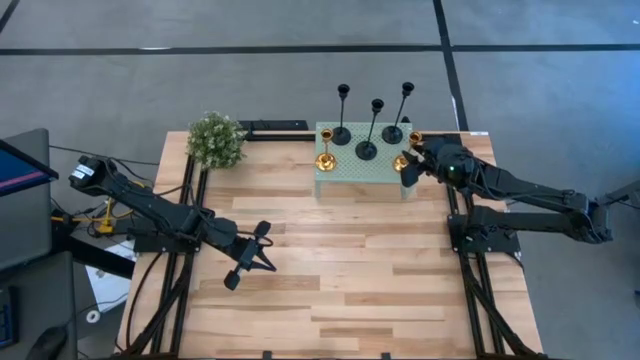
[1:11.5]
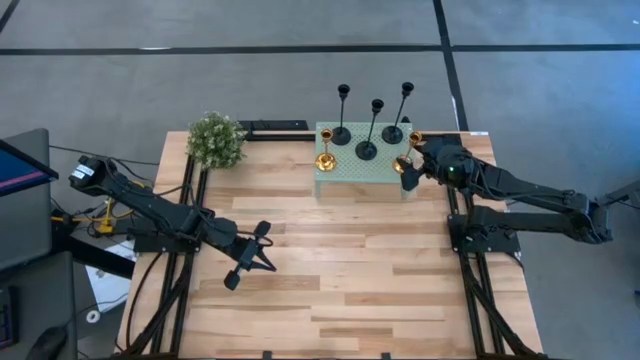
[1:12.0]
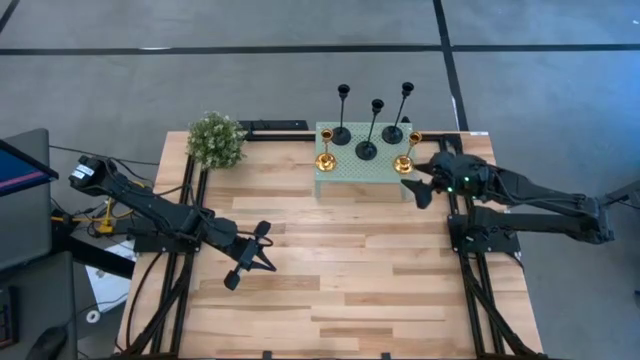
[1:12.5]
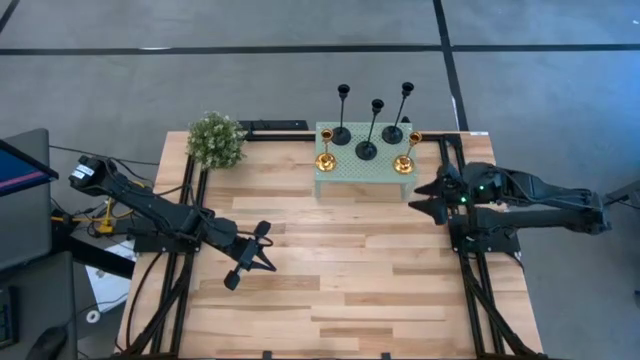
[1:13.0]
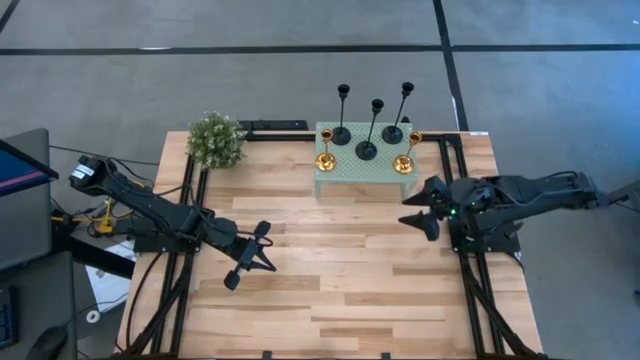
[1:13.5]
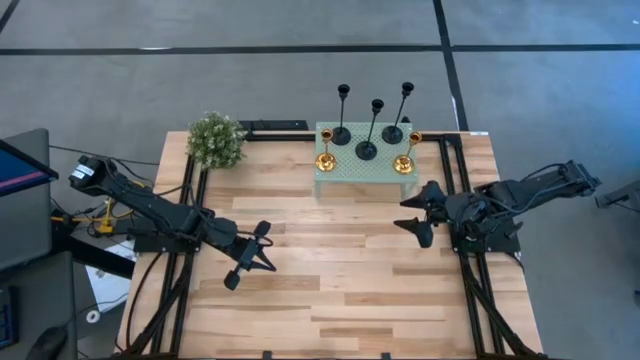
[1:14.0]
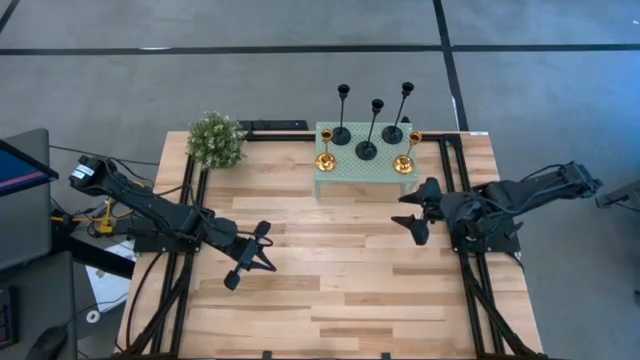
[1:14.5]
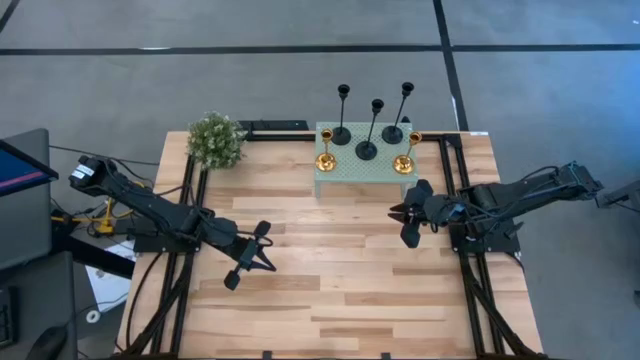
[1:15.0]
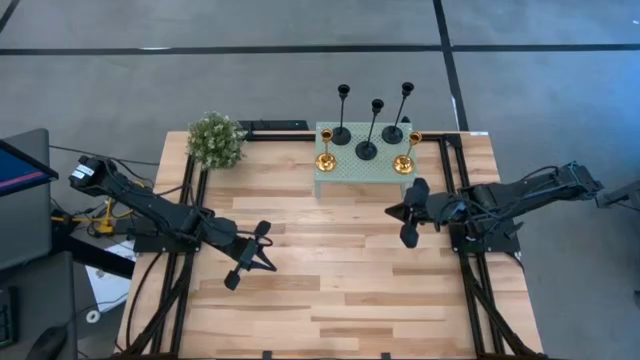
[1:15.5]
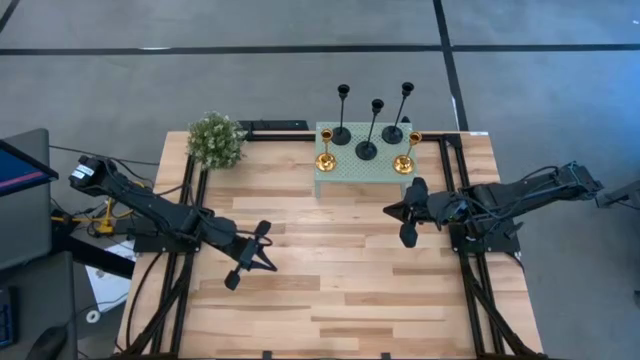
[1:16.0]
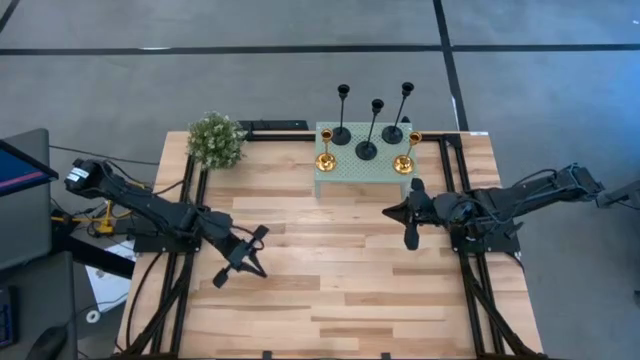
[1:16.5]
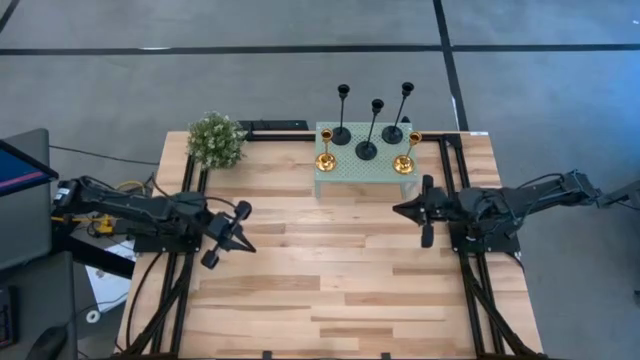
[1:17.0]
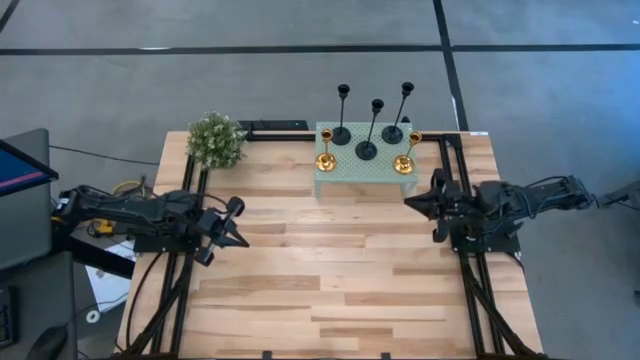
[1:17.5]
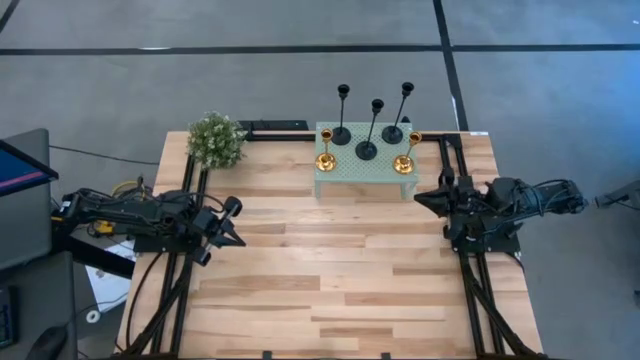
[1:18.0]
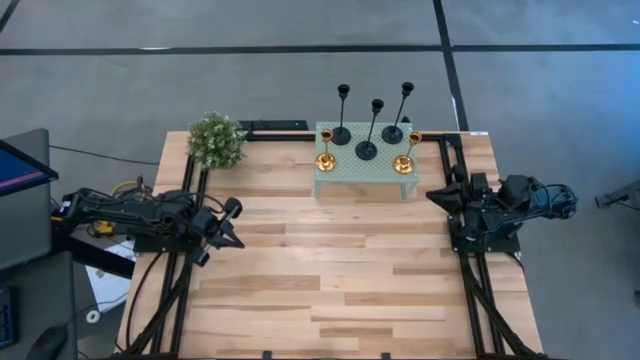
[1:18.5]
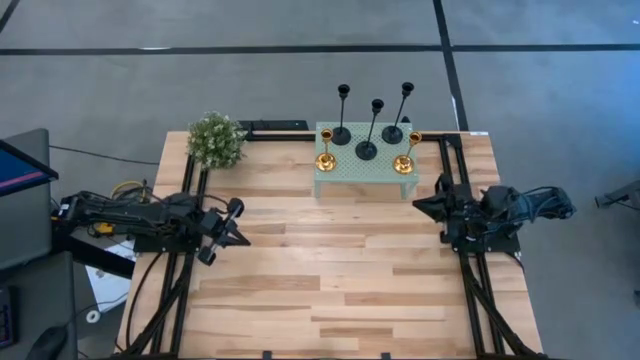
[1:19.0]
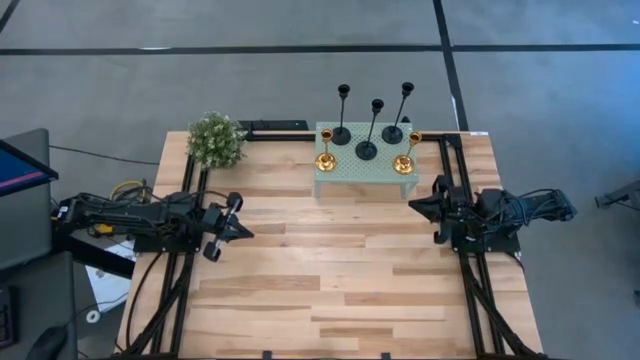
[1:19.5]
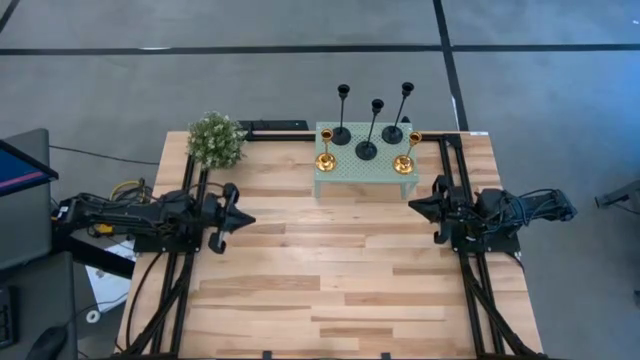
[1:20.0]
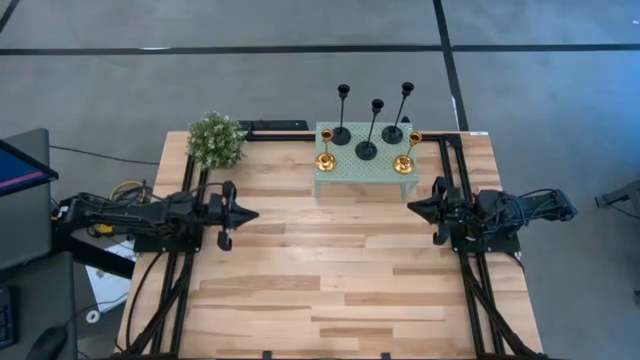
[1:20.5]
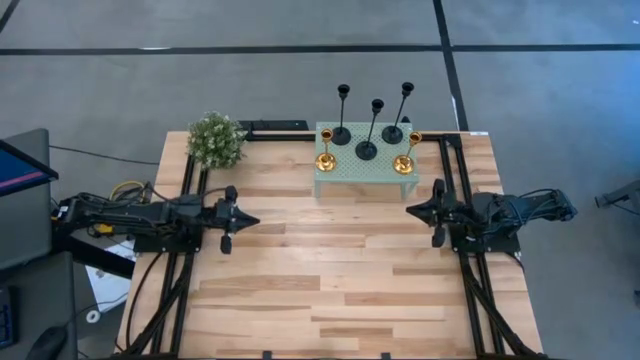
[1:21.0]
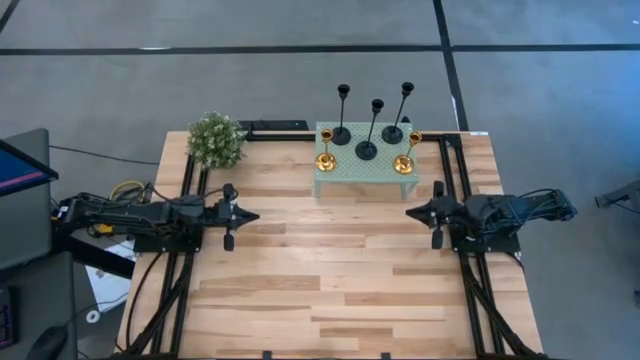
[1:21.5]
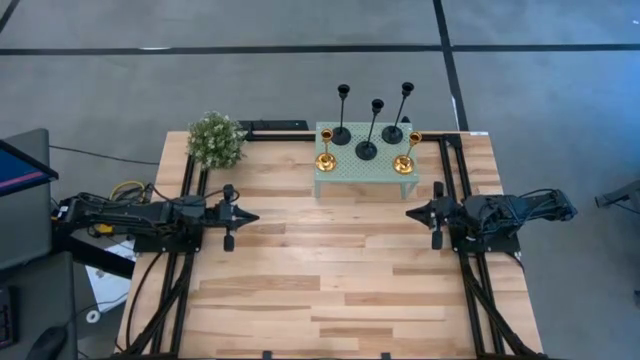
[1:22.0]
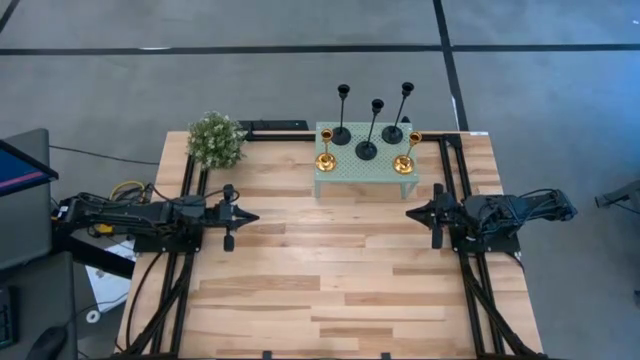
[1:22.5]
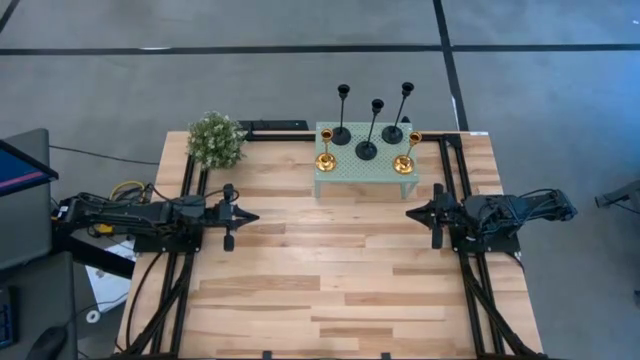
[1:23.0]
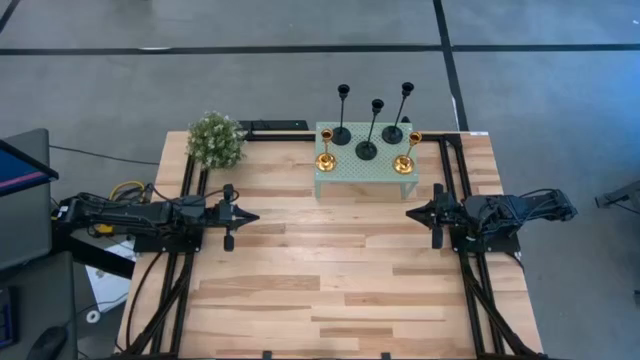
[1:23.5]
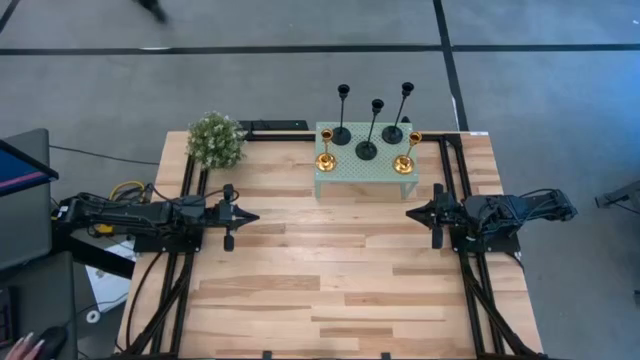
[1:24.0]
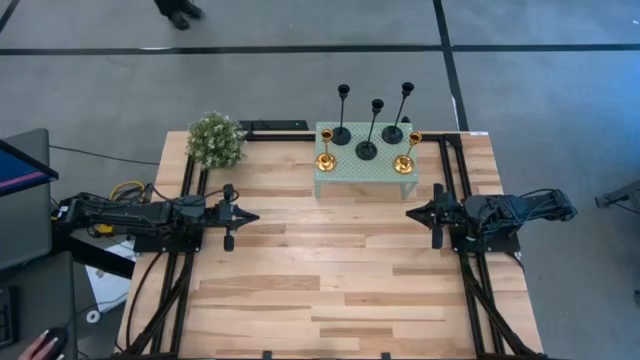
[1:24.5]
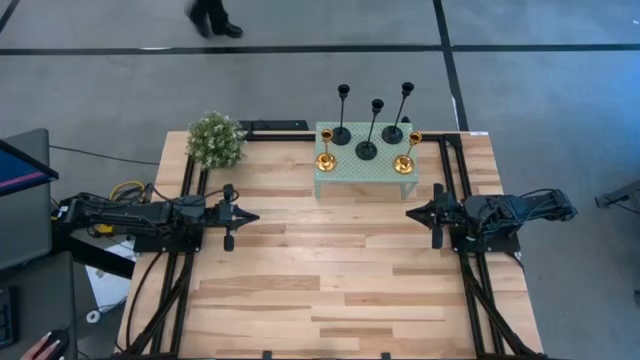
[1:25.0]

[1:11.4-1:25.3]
Task: Pick & Place candle stick holders
Return to Home Position

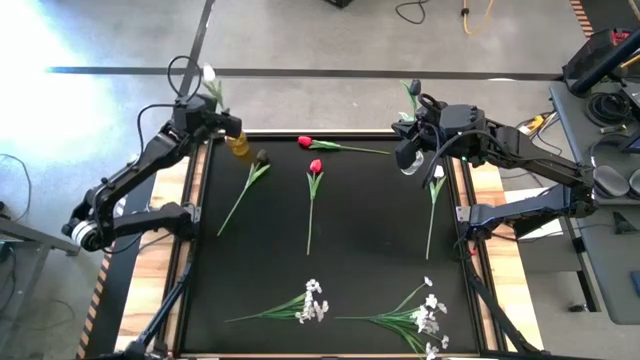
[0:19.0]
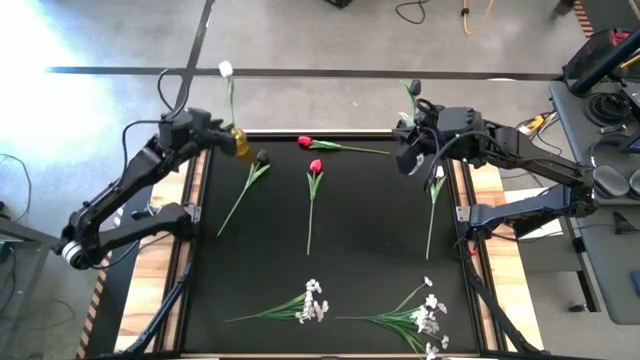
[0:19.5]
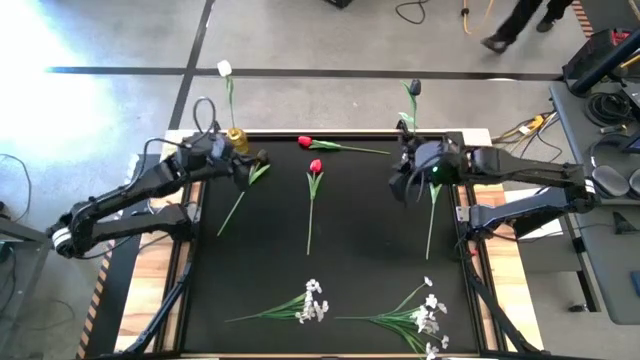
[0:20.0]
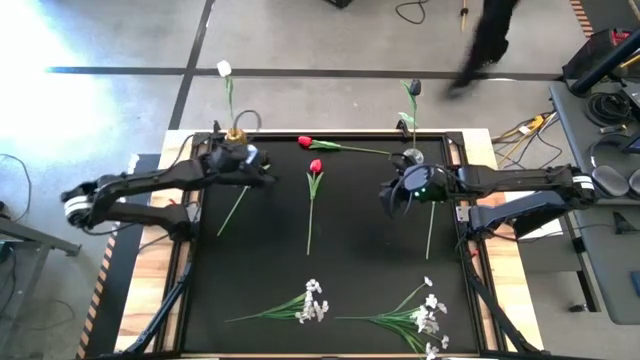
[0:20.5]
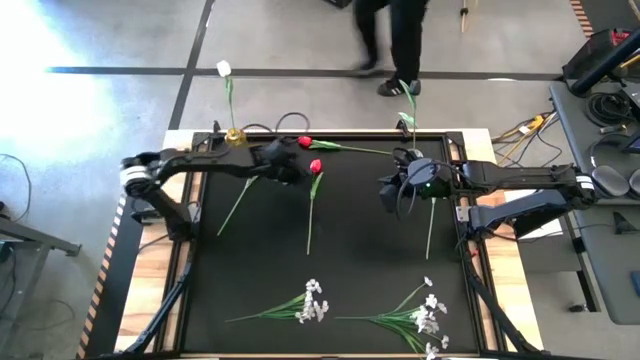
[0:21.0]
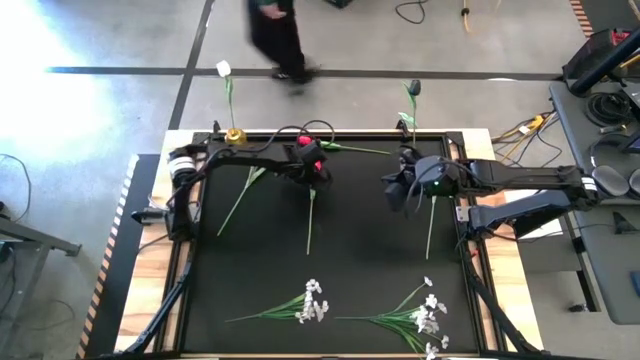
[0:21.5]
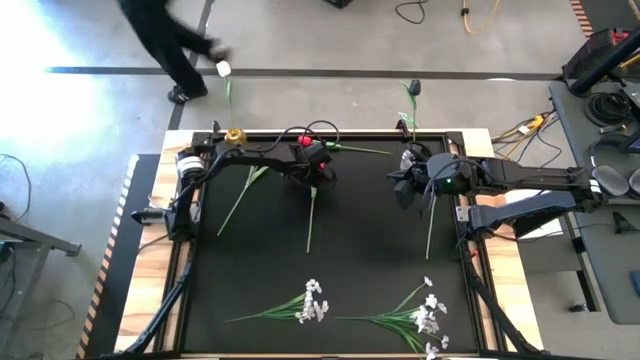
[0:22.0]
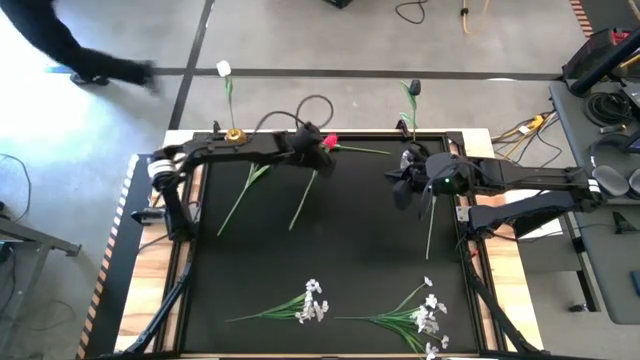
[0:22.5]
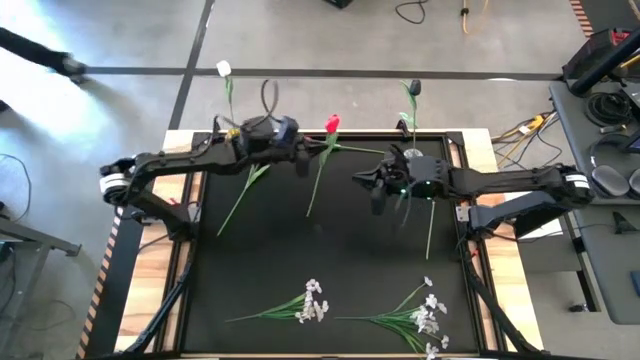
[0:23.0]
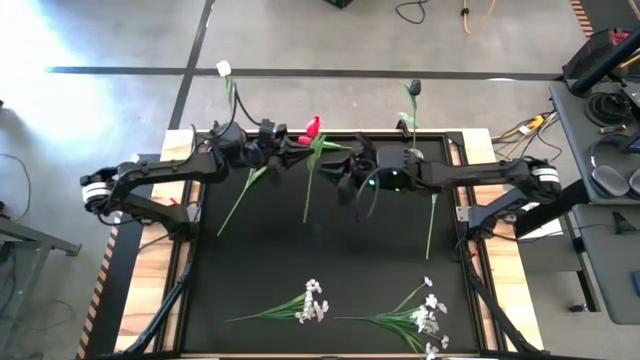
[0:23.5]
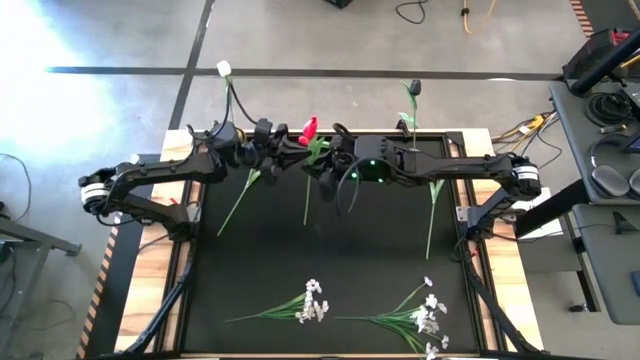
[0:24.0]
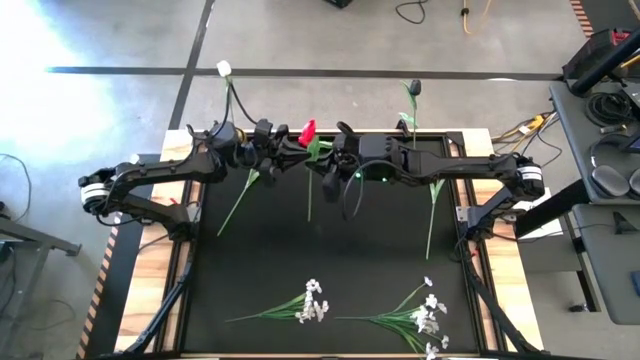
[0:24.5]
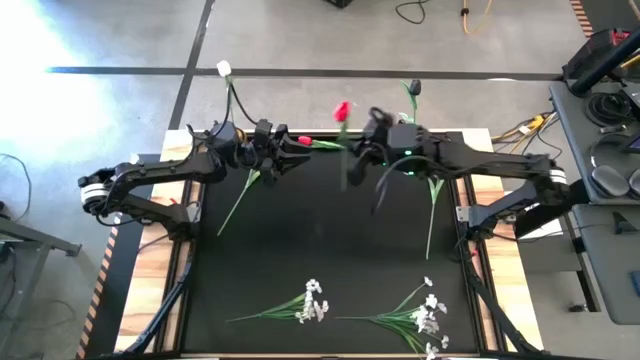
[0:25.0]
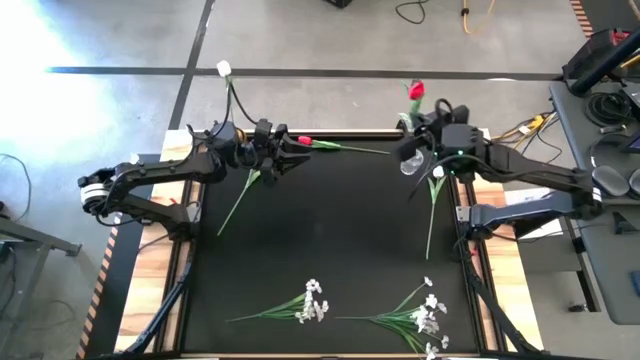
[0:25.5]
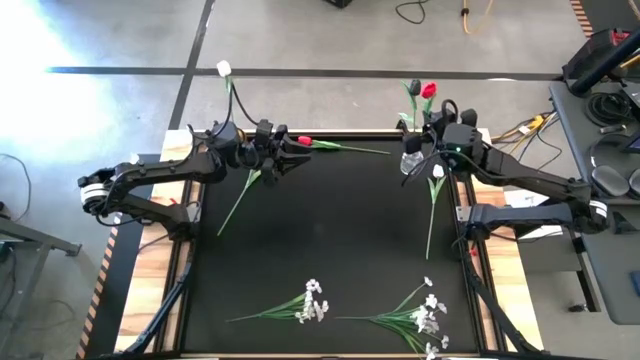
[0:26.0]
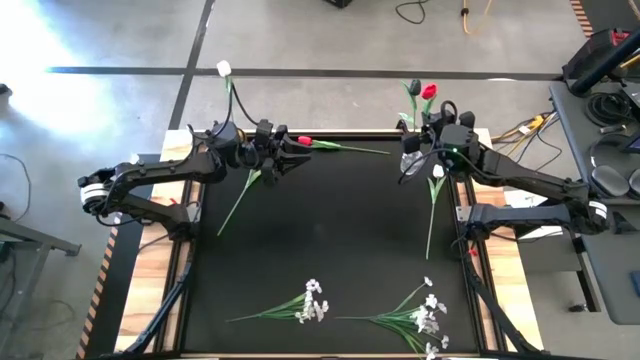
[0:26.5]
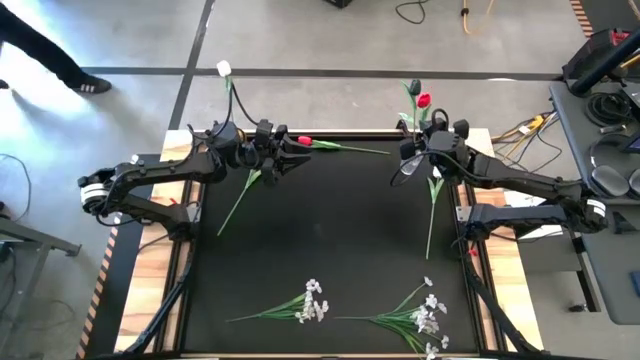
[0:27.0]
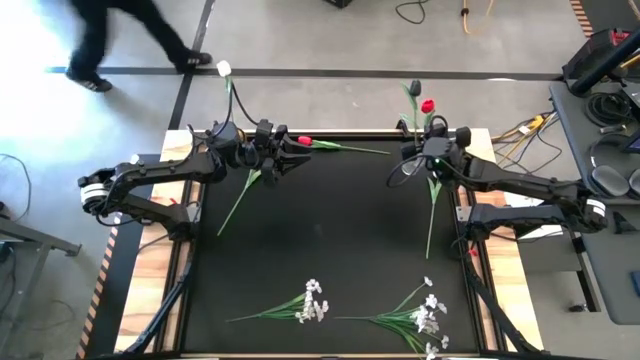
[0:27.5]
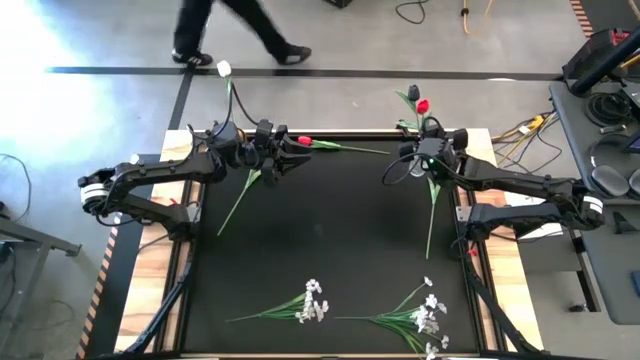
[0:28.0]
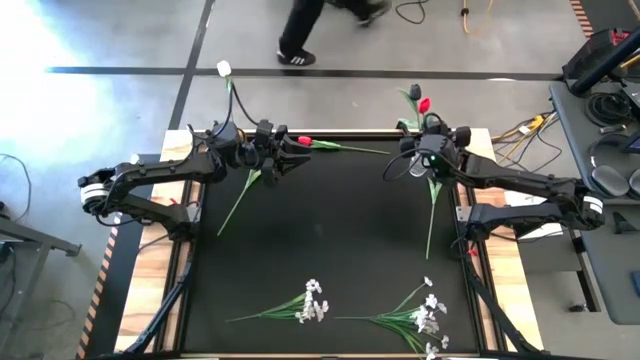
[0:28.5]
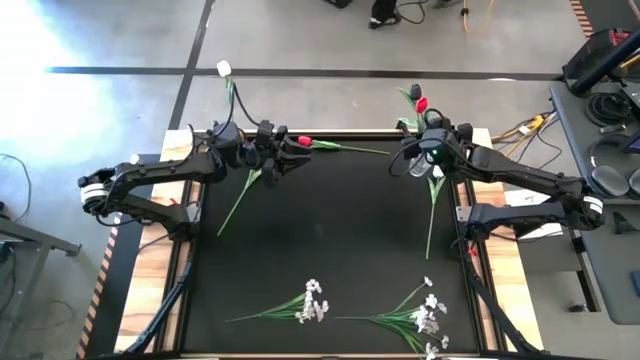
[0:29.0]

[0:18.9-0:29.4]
Task: Sort flowers into vase by color
Put the bottom red tulip into the transparent vase
